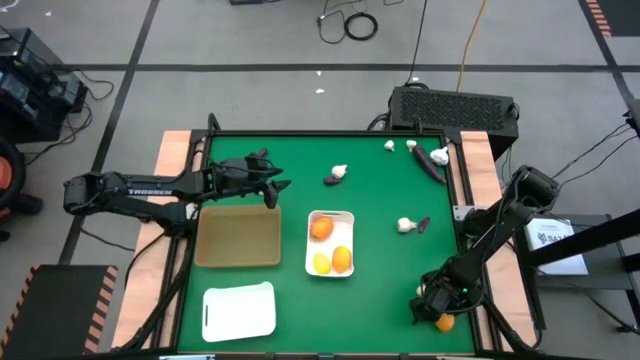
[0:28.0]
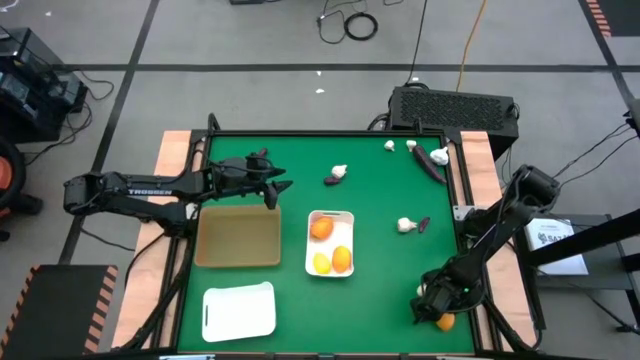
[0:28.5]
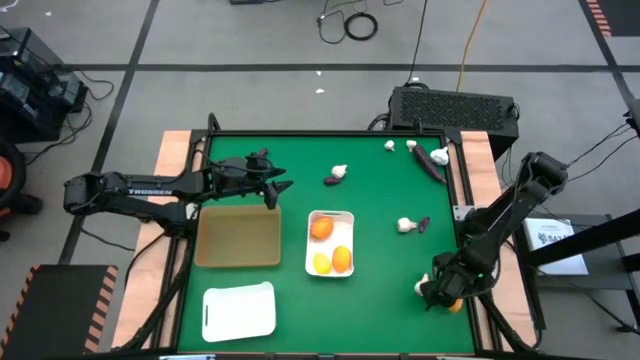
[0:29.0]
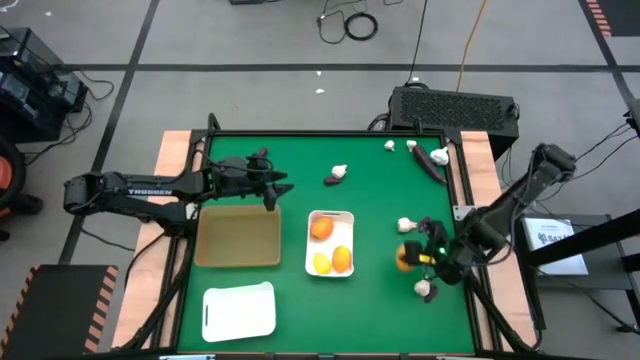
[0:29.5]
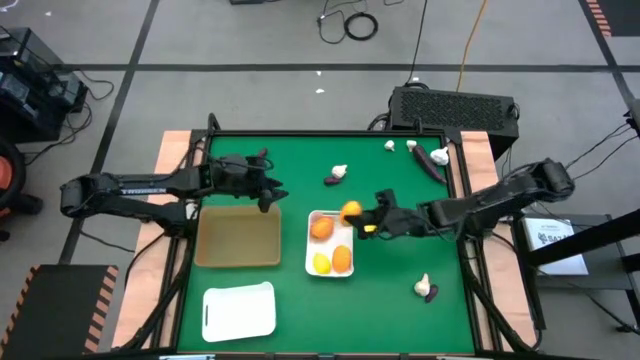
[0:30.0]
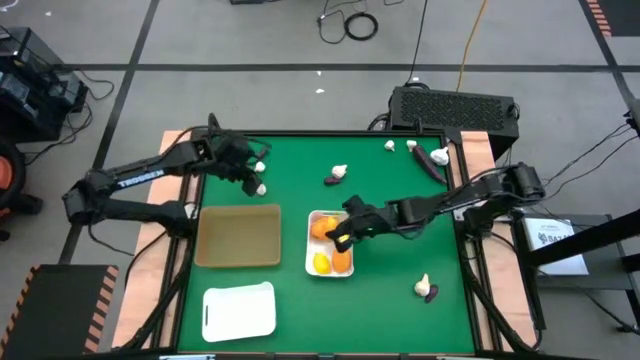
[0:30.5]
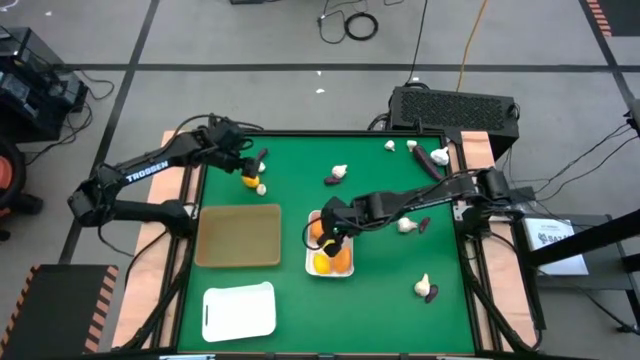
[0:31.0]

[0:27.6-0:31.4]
Task: Sort produce into baskets
Put the yellow lemon into the top white bin

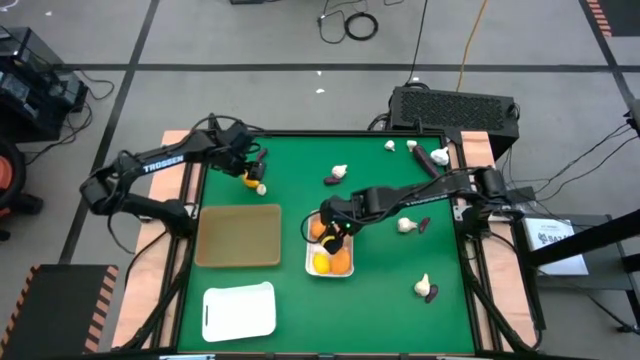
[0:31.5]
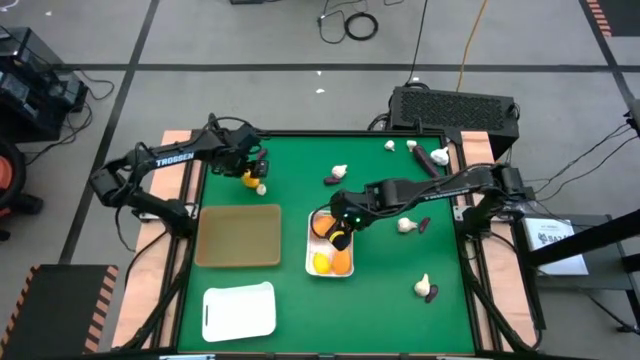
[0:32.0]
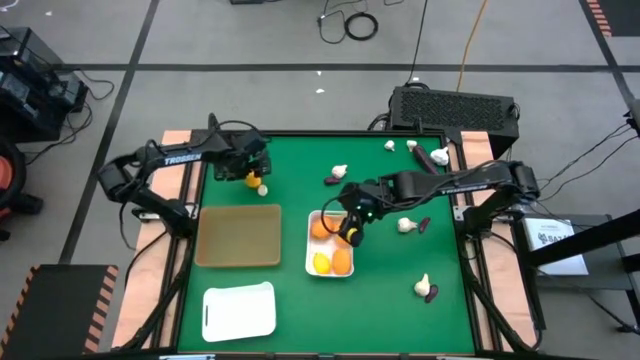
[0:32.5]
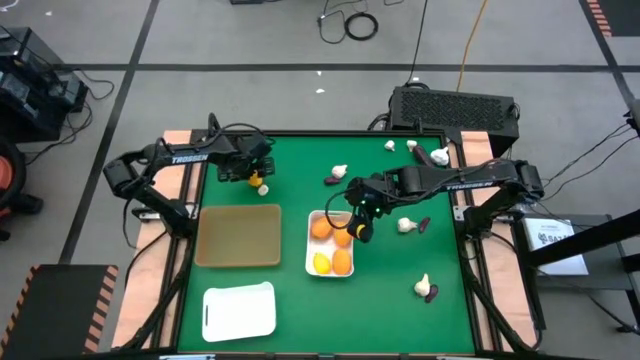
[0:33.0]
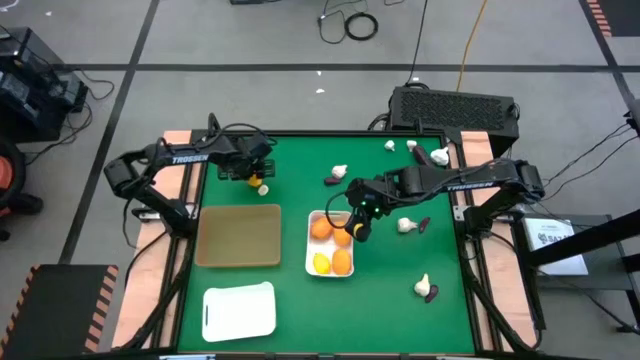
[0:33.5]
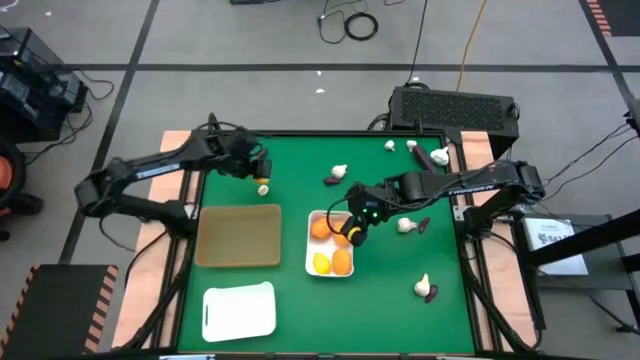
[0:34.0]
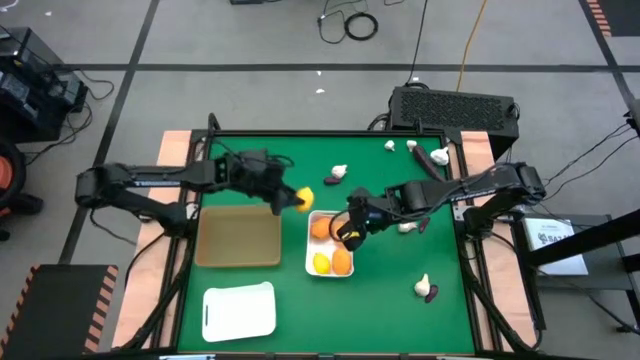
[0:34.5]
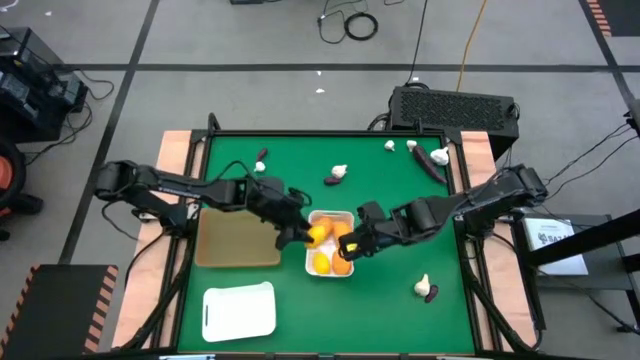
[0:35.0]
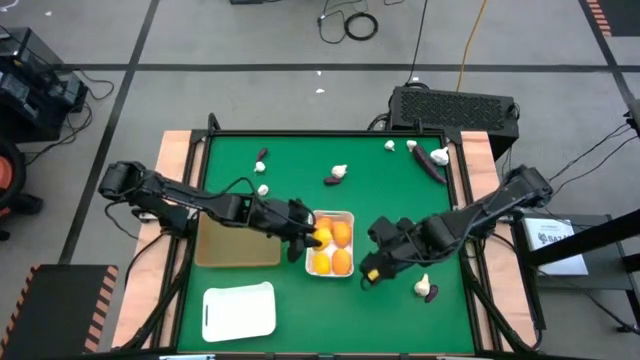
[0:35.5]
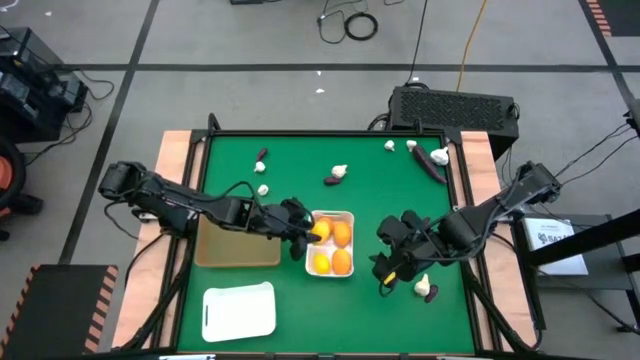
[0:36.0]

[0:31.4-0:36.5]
Put the yellow lemon into the top white bin

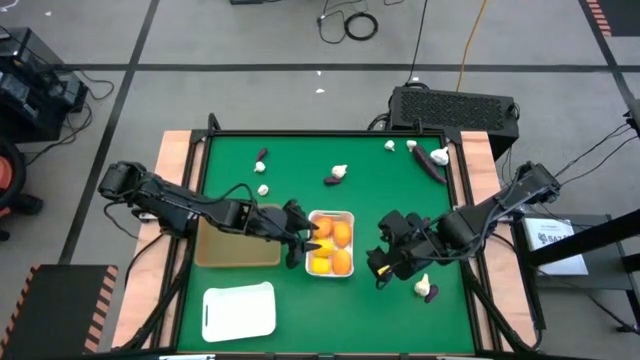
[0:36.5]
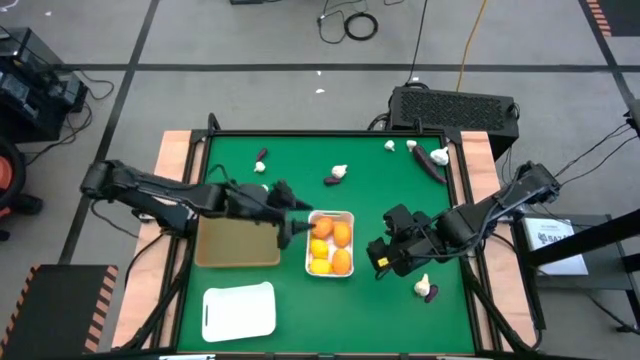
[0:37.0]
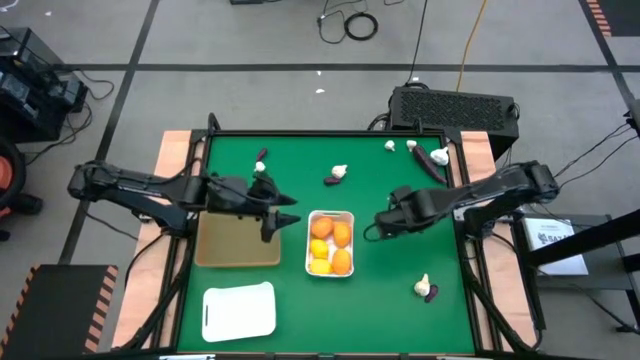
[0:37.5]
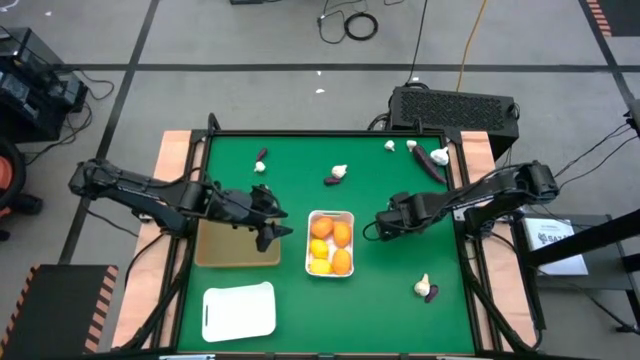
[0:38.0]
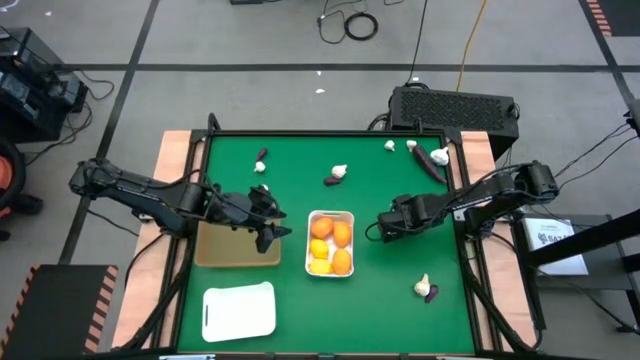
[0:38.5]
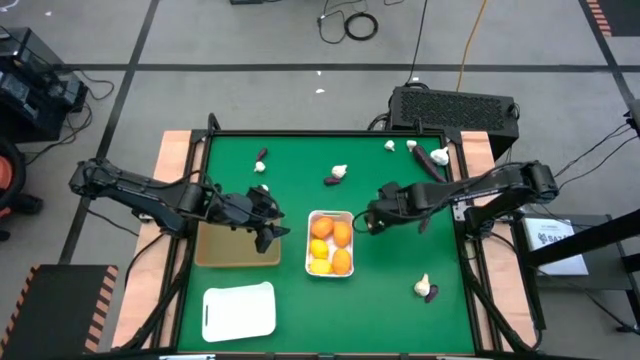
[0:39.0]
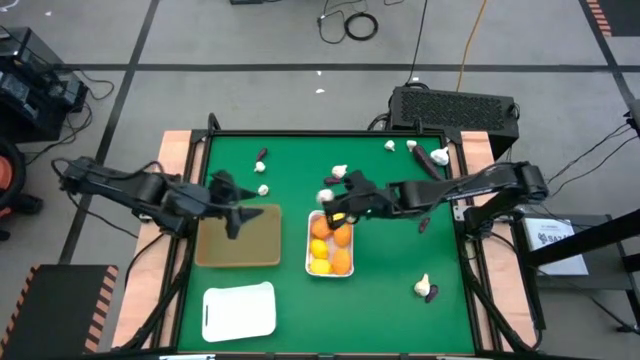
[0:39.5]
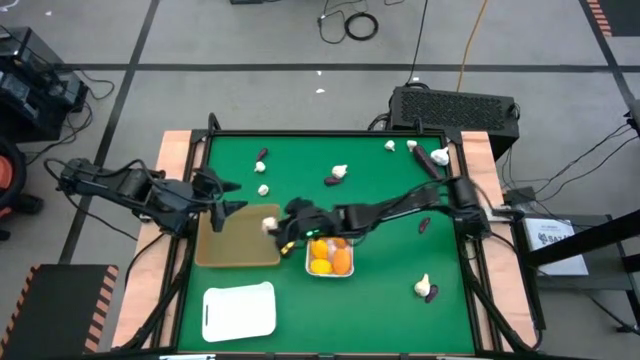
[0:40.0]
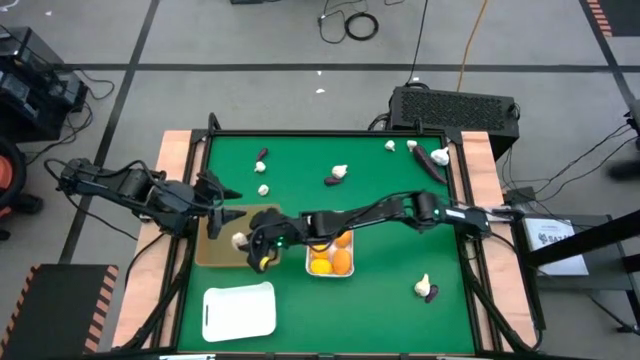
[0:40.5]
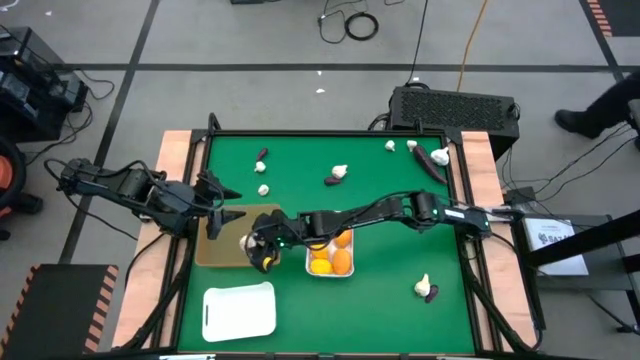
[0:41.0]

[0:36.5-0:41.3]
Put the white garlic into the orange bin

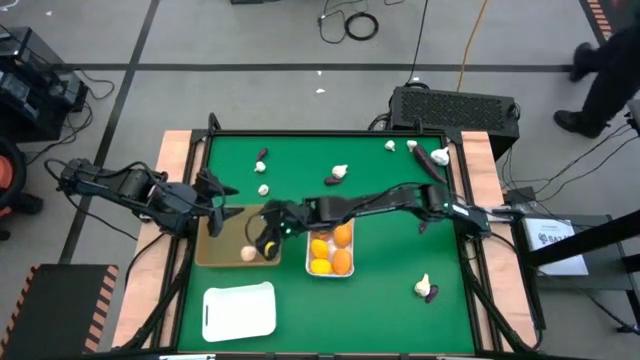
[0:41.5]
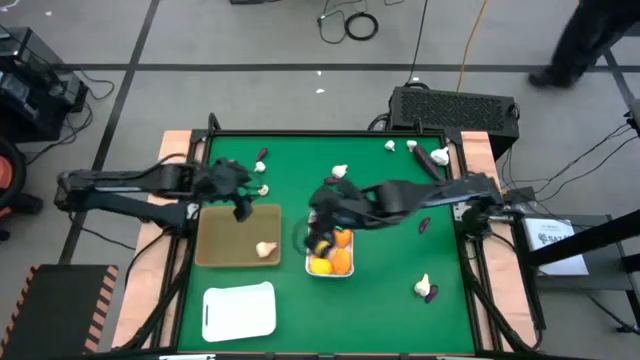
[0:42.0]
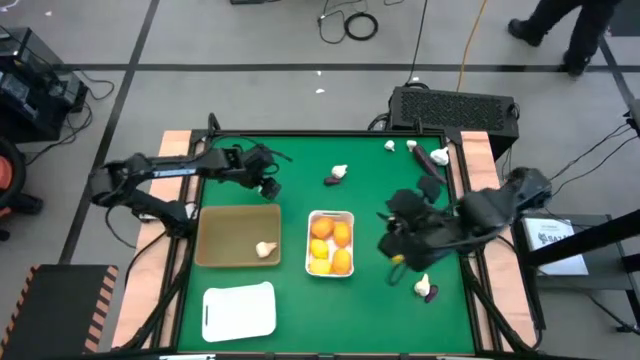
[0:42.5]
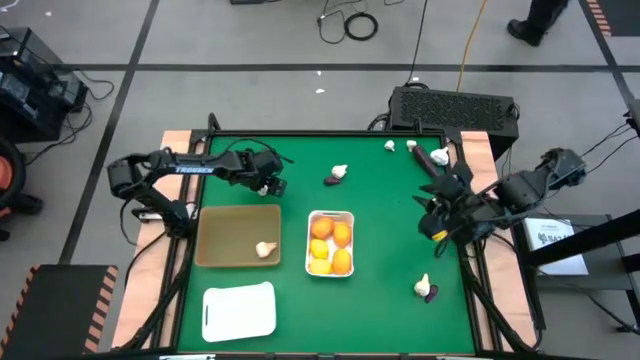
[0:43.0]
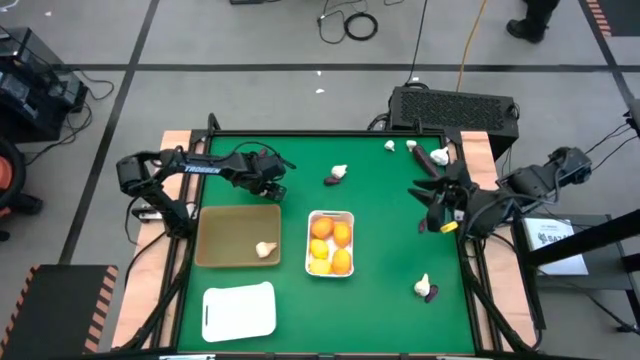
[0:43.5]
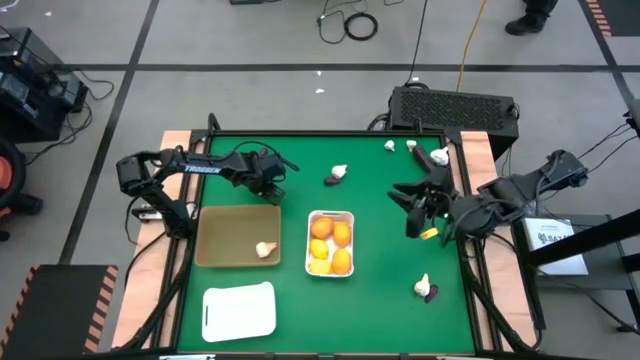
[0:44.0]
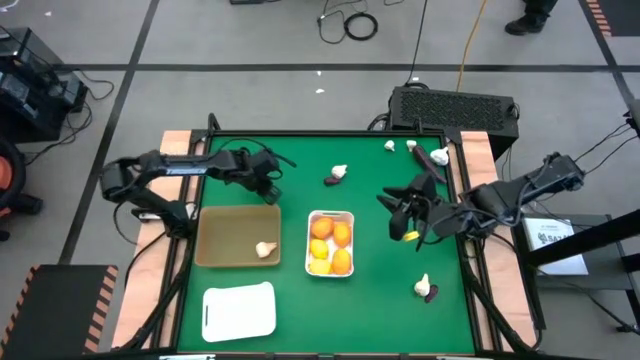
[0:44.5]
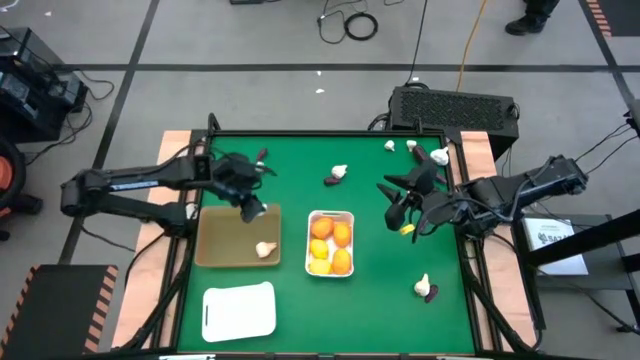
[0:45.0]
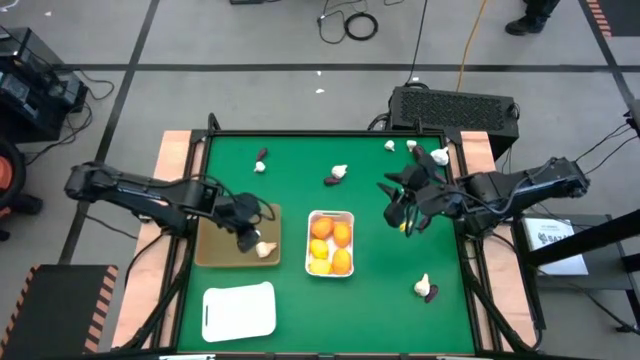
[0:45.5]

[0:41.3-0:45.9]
Put the white garlic into the orange bin

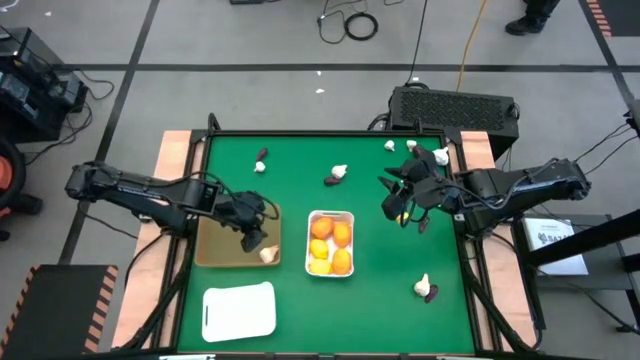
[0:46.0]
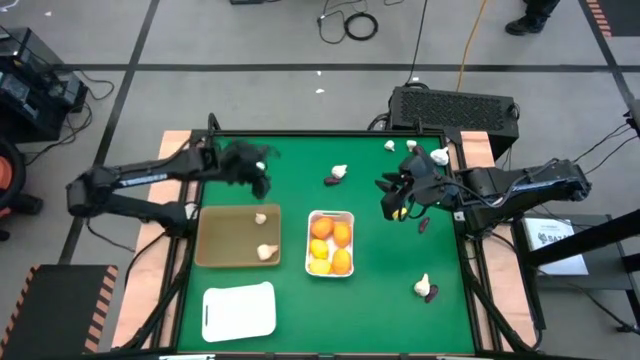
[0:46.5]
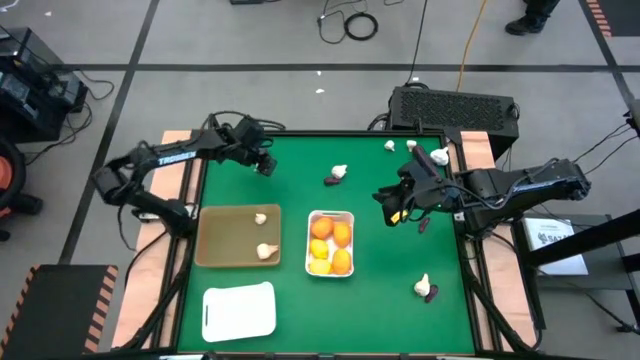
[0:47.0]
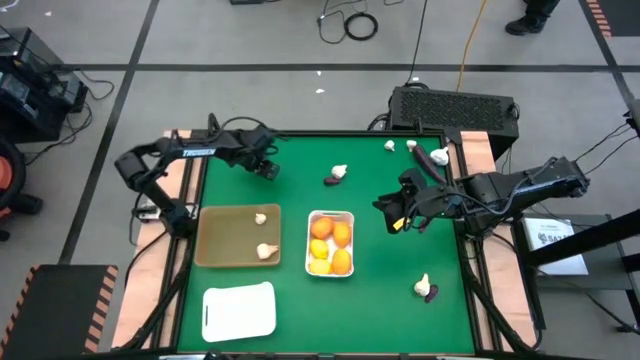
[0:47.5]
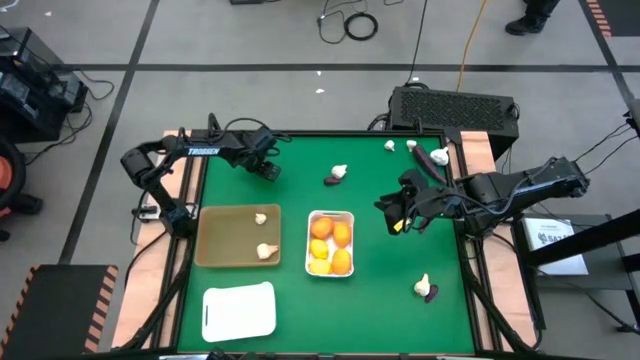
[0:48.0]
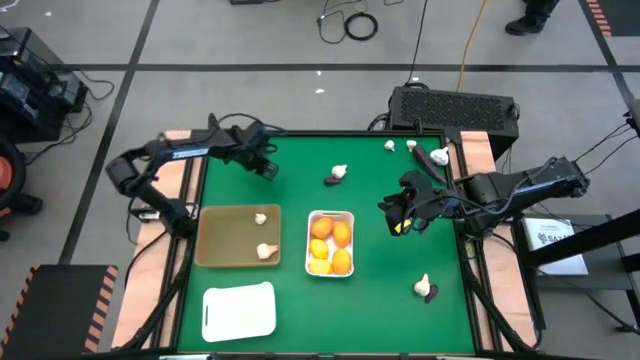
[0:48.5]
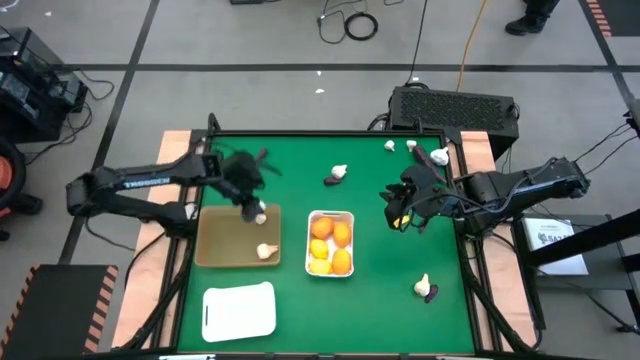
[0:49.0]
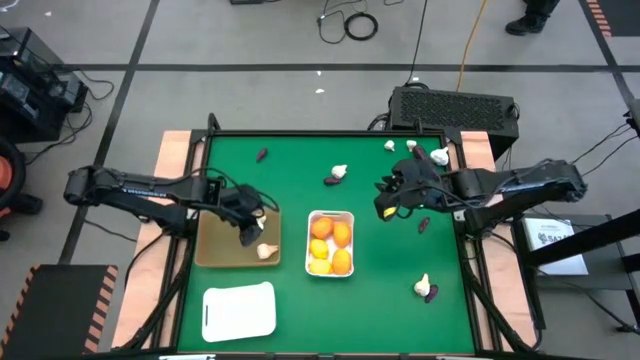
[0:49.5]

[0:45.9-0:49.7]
Put the white garlic into the orange bin
